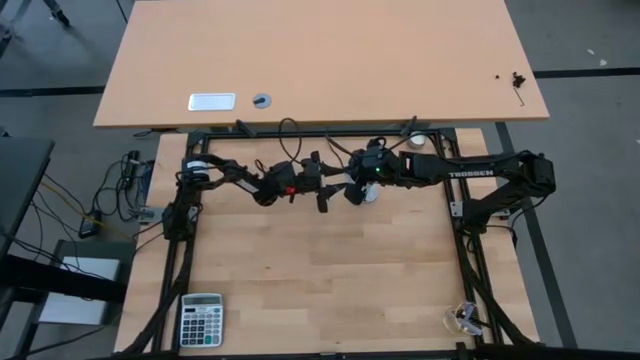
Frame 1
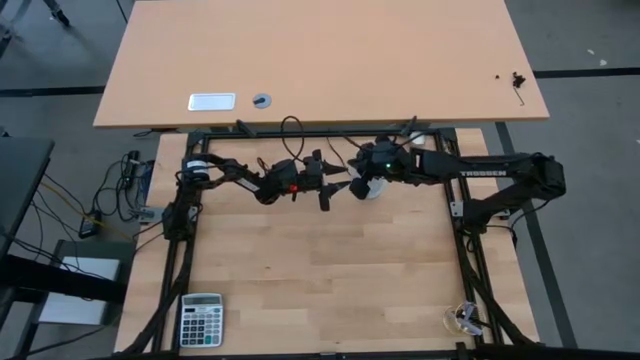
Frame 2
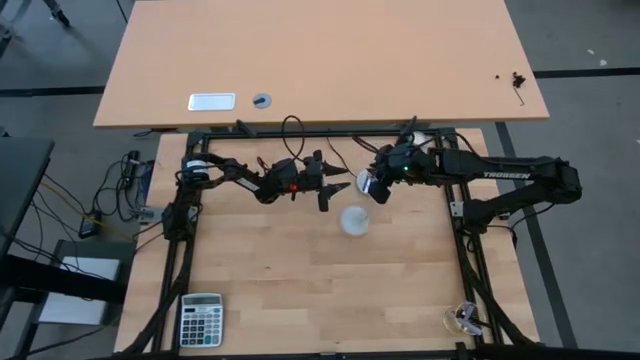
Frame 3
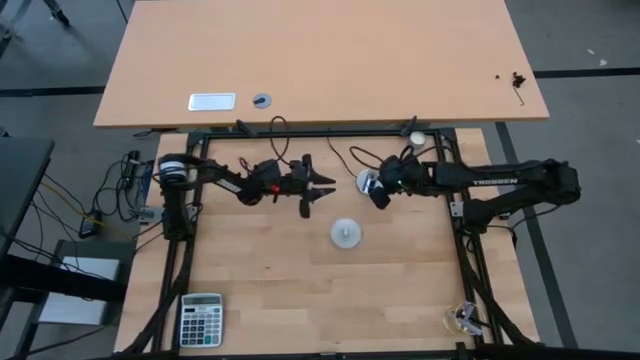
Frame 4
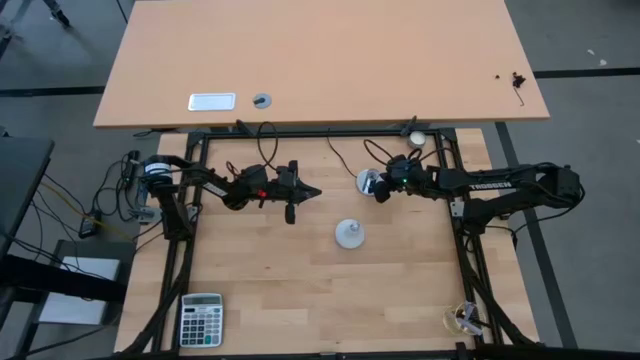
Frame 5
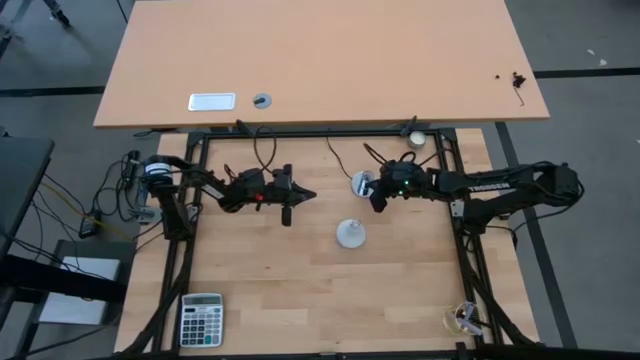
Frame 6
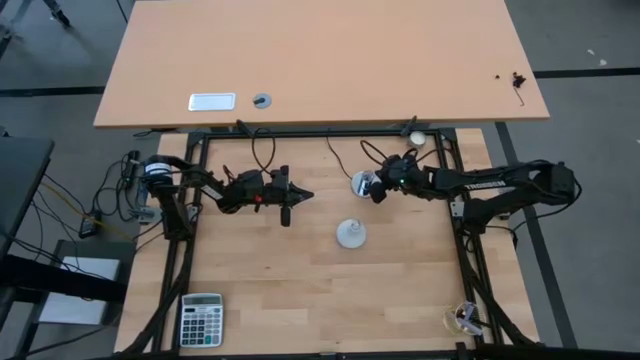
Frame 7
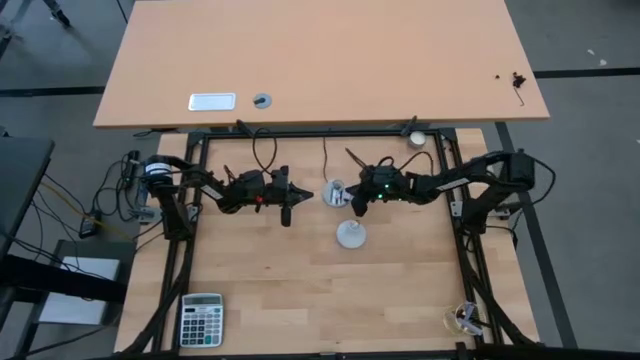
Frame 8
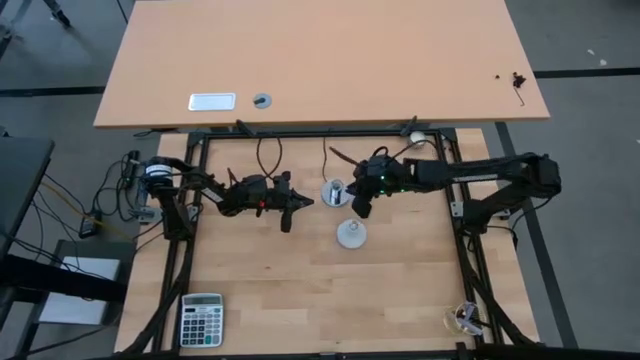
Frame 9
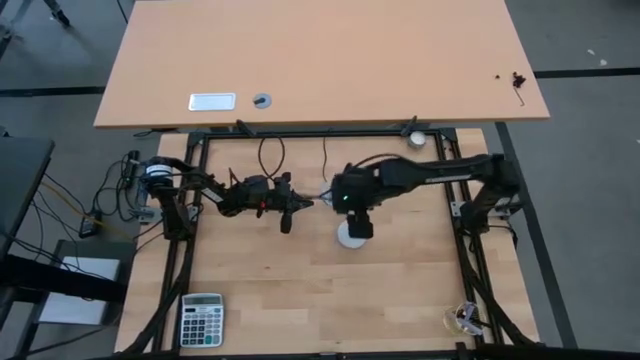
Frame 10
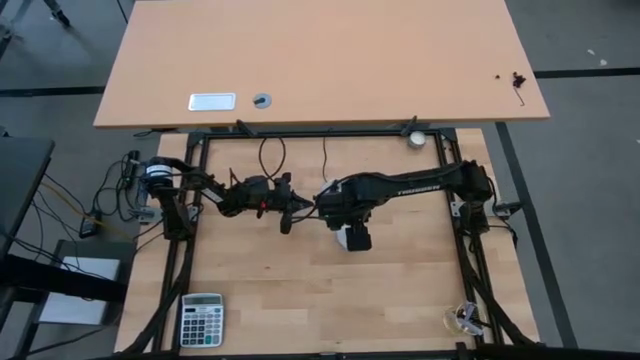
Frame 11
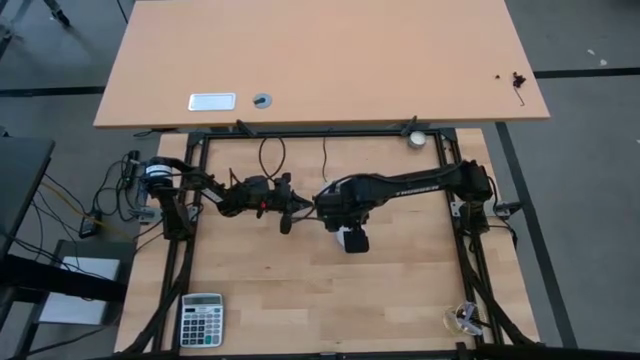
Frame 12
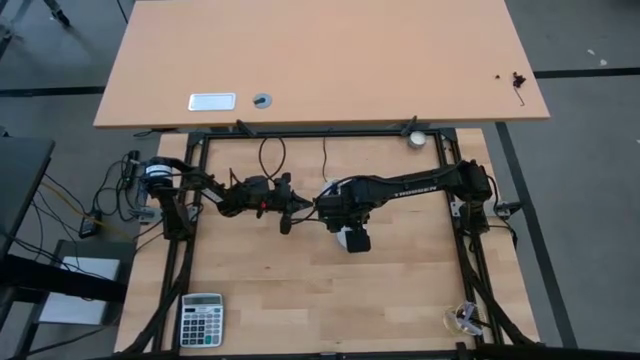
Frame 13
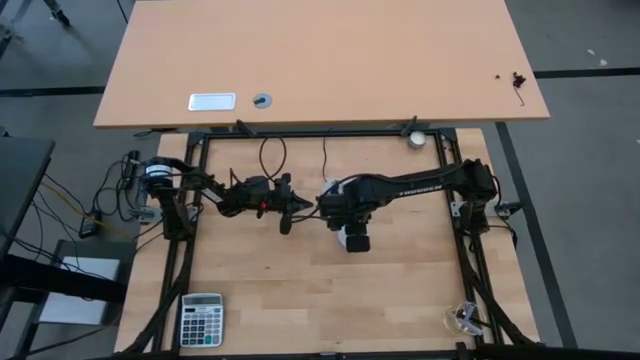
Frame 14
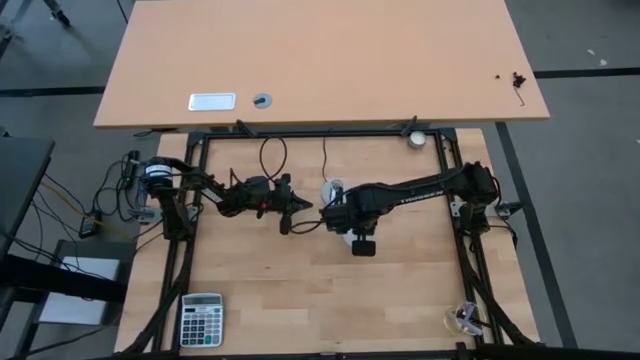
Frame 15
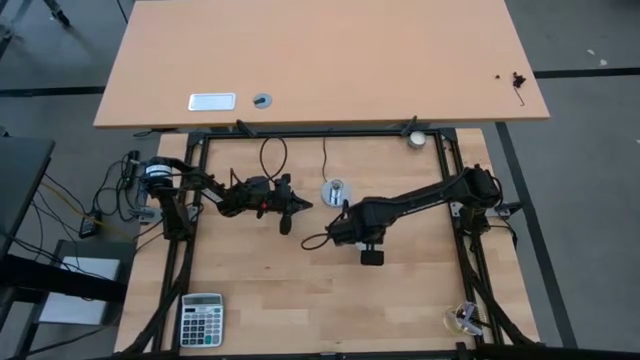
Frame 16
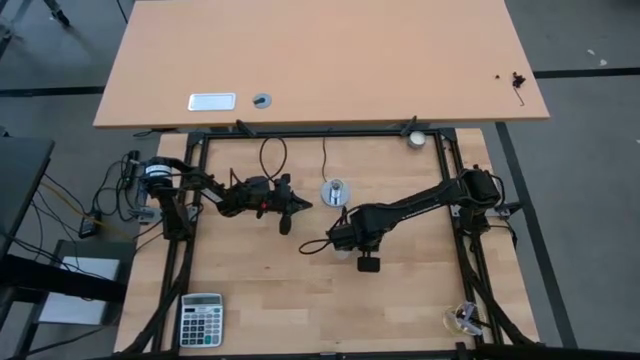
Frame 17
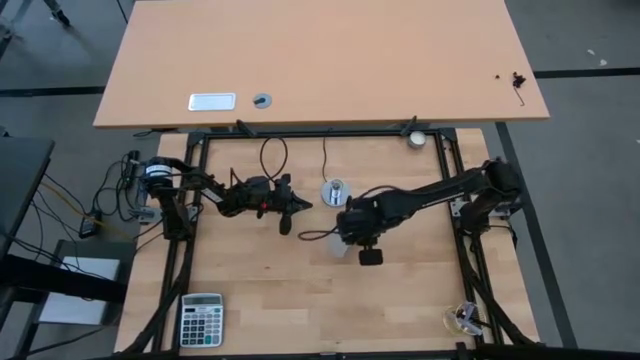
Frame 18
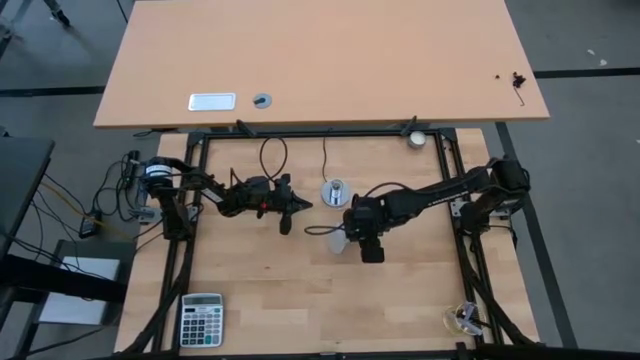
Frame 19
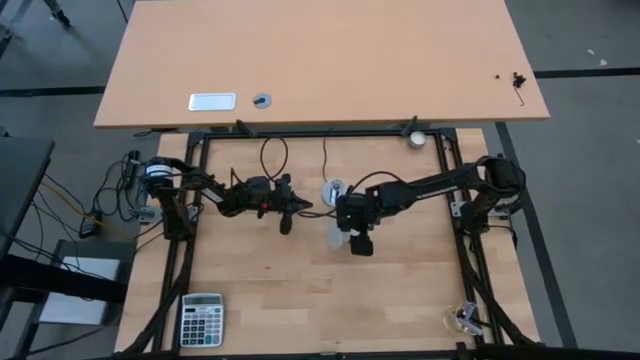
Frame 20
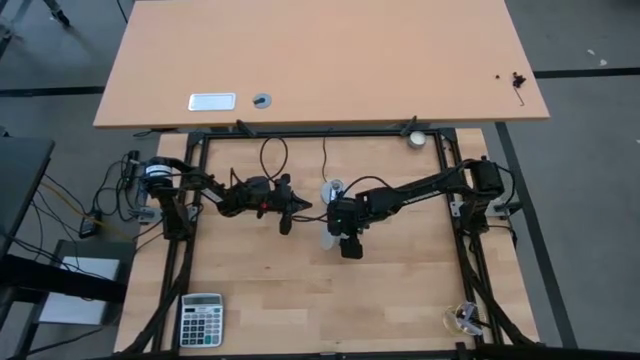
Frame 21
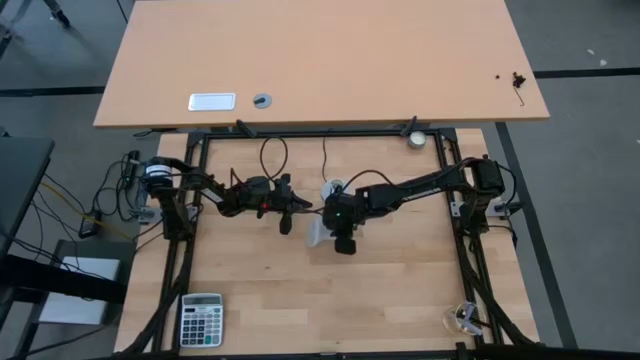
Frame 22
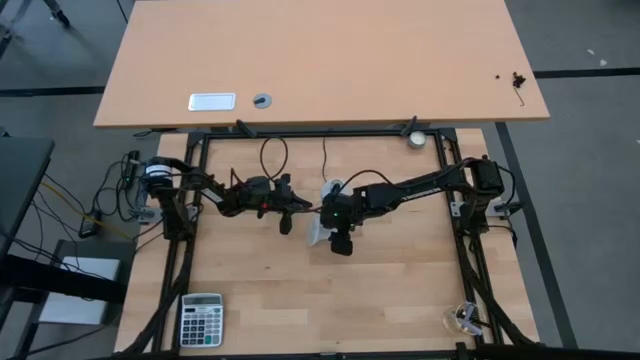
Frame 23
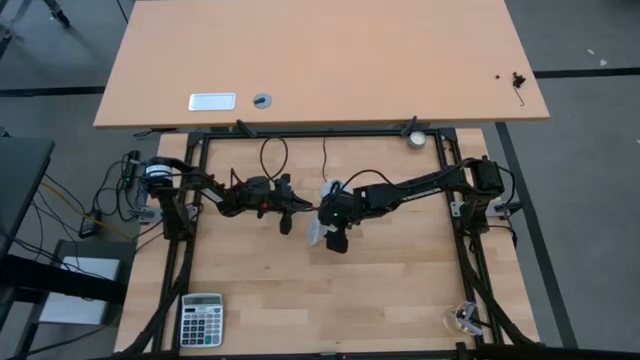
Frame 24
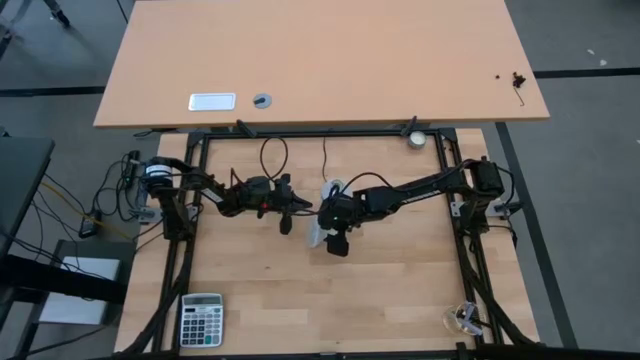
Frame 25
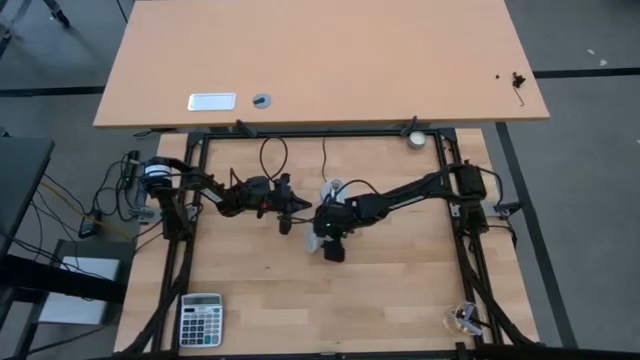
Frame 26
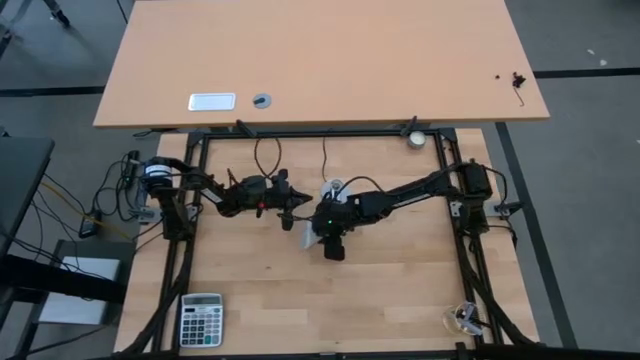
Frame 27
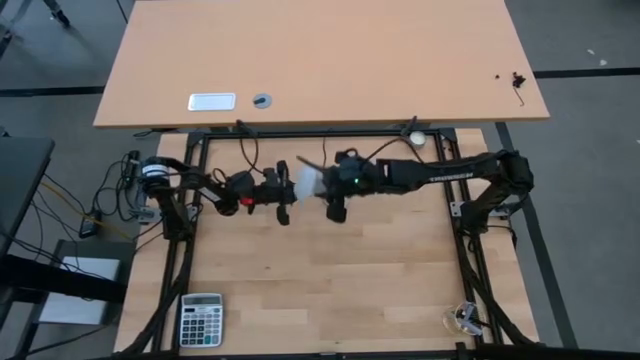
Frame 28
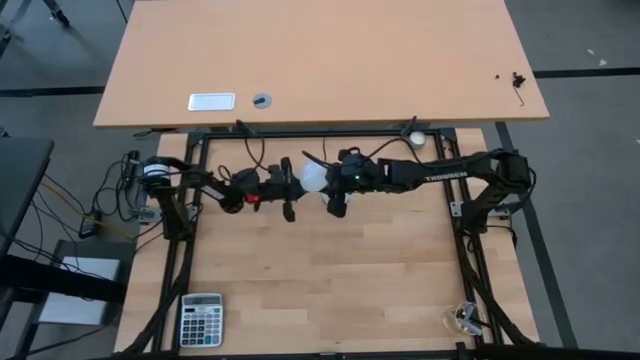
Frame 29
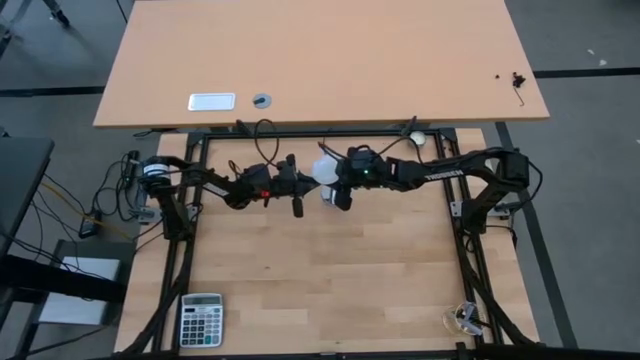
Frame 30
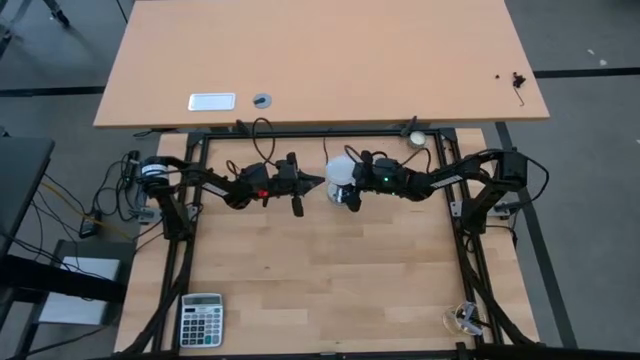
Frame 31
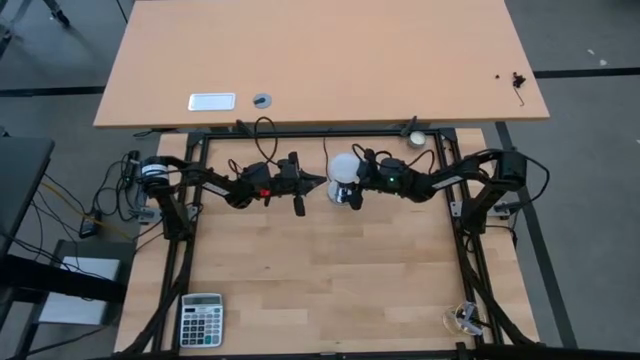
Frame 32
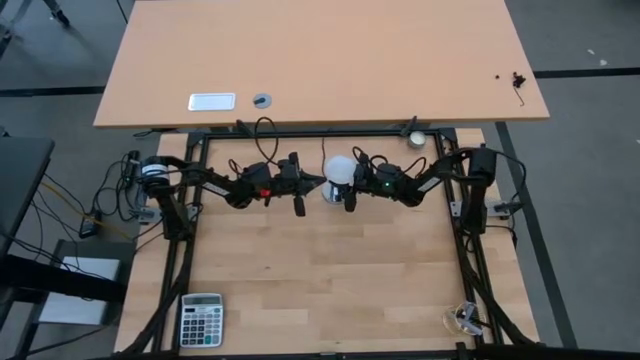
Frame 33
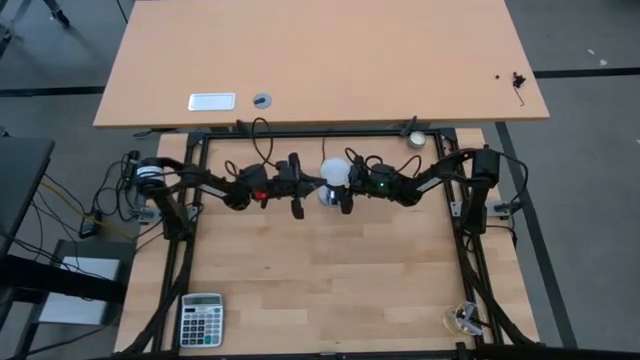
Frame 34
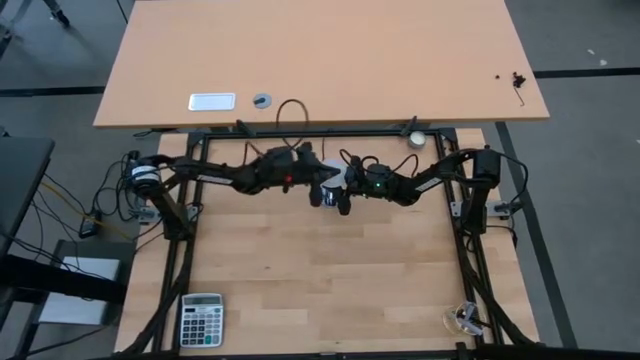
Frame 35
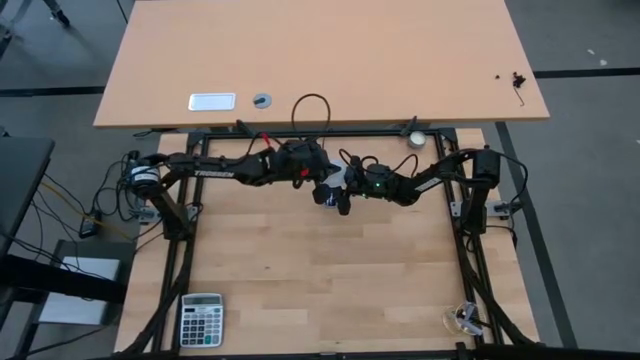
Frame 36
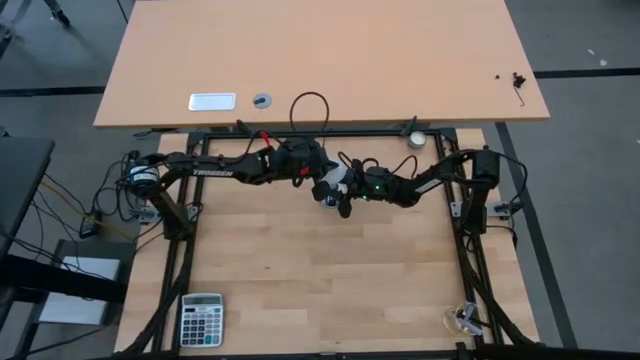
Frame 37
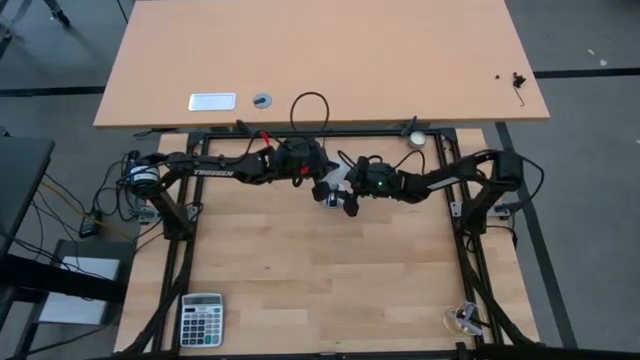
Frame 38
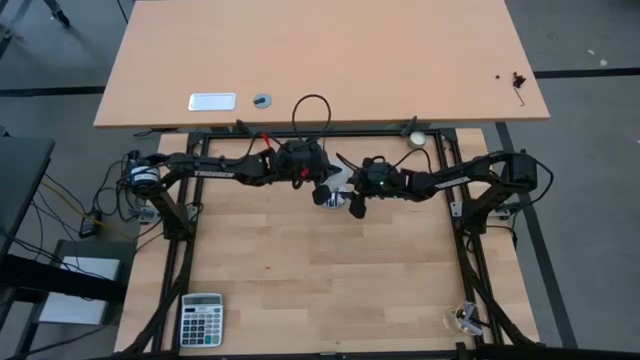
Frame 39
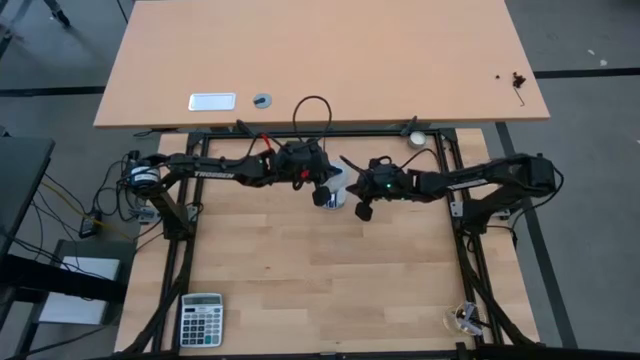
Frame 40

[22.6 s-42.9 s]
Task: Screw lightbulb
Insert the lightbulb into the silver lamp socket

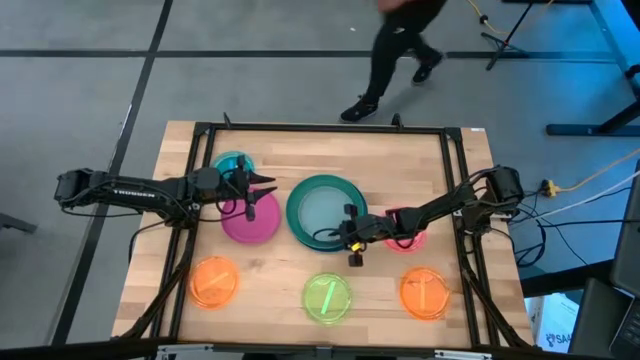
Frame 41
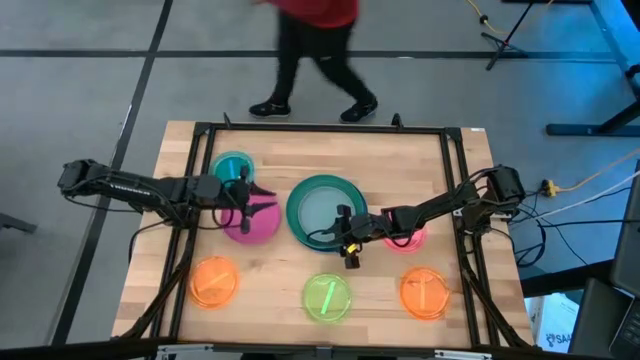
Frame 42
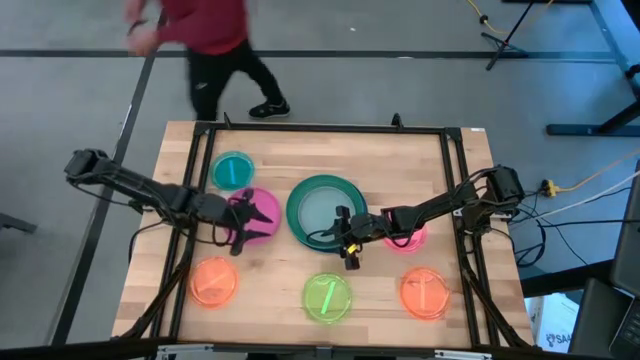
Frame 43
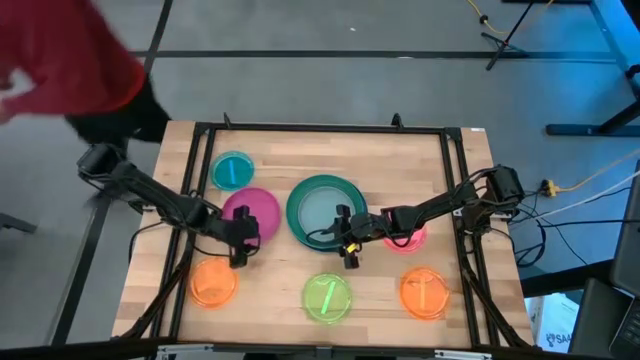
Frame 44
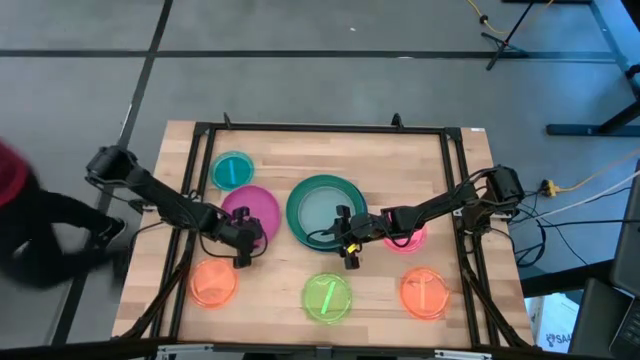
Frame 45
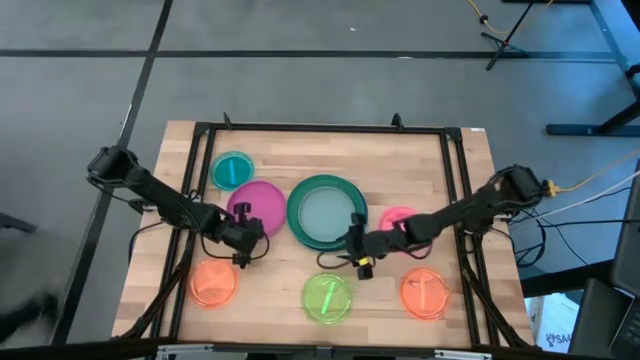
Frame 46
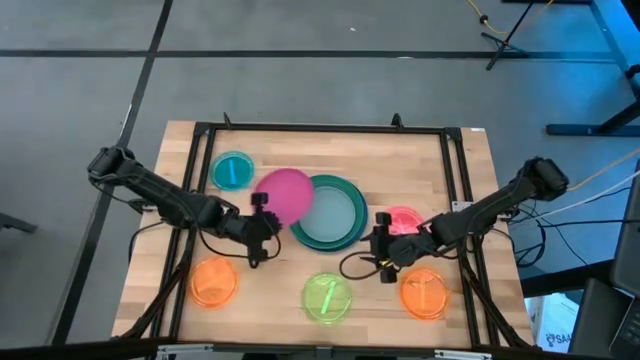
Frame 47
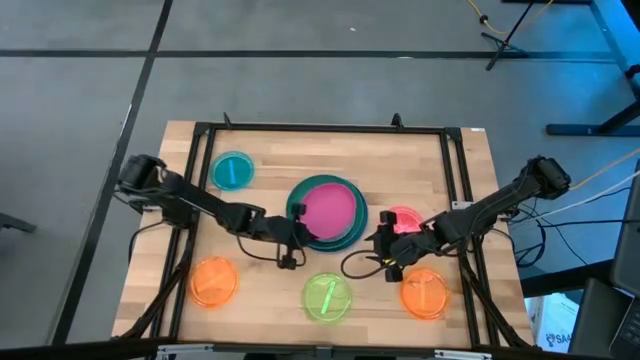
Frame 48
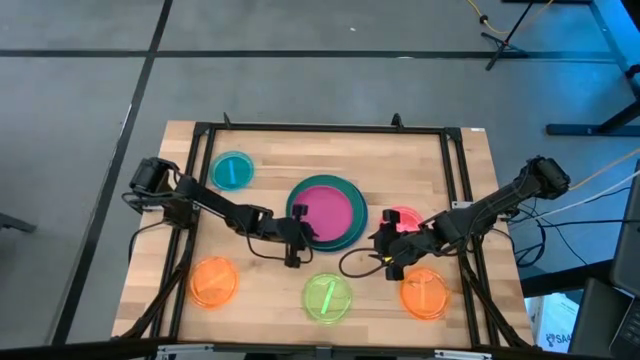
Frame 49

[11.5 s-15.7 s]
Task: Stack plastic plates
Stack the pink plate on top of the light blue plate
